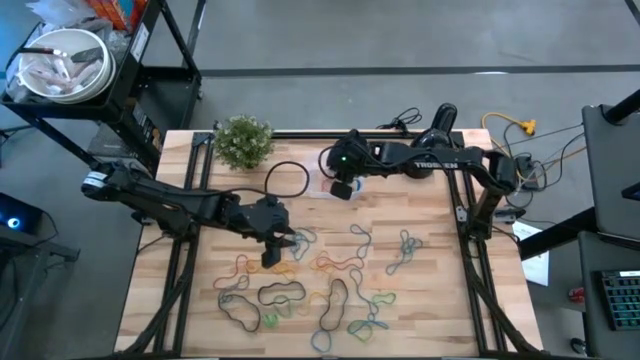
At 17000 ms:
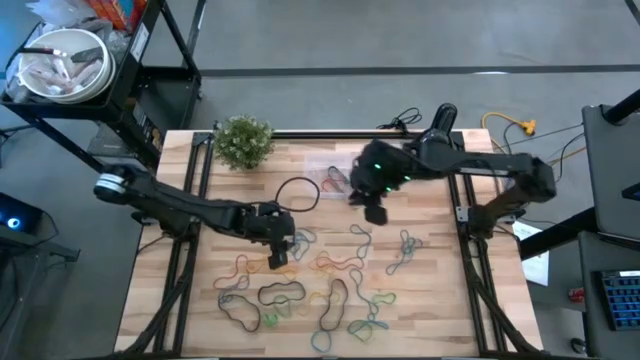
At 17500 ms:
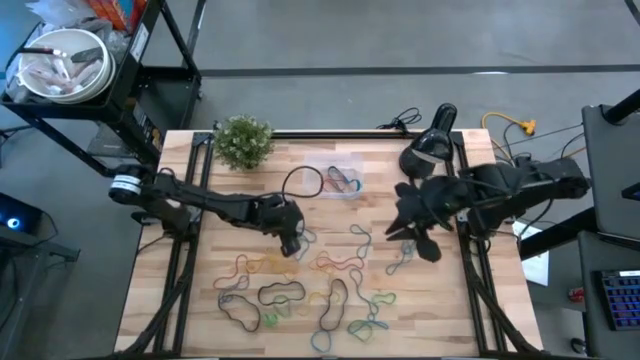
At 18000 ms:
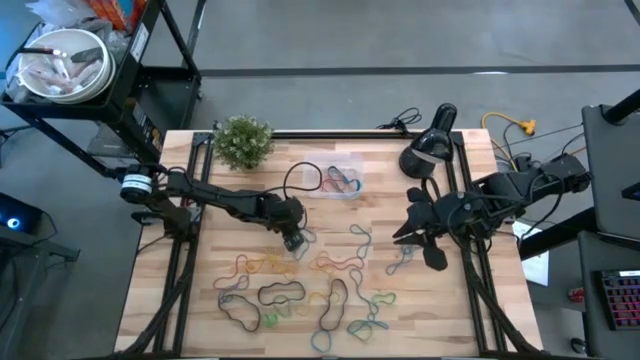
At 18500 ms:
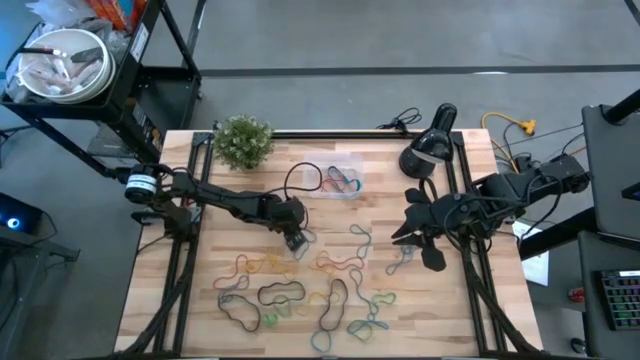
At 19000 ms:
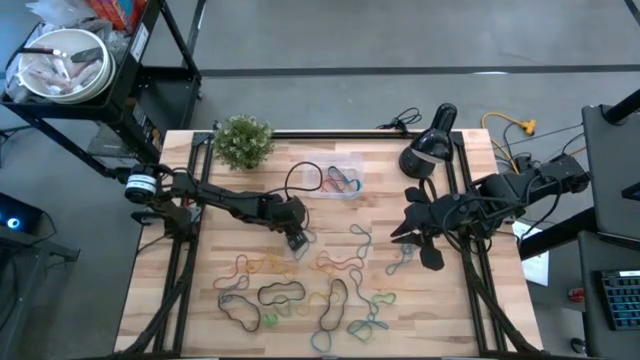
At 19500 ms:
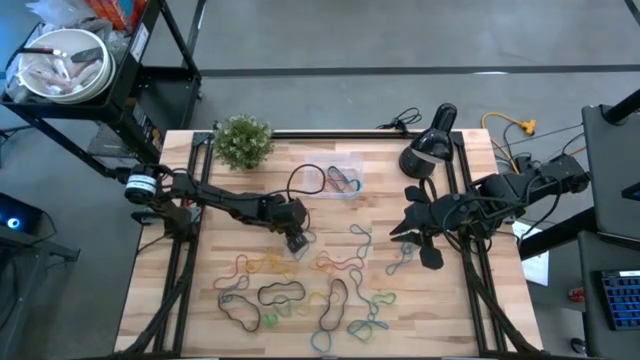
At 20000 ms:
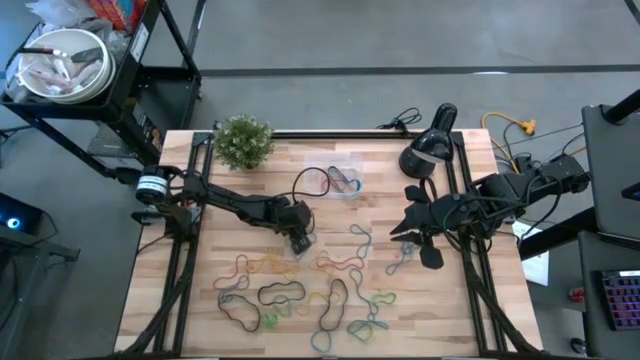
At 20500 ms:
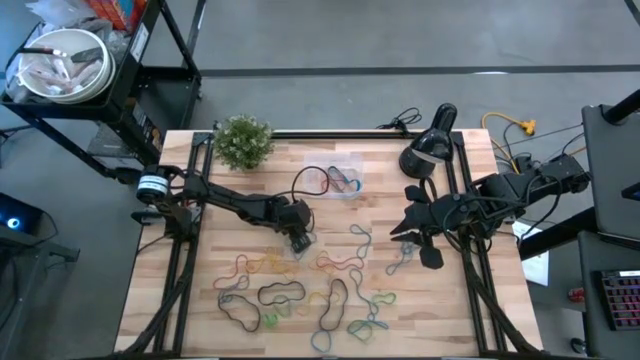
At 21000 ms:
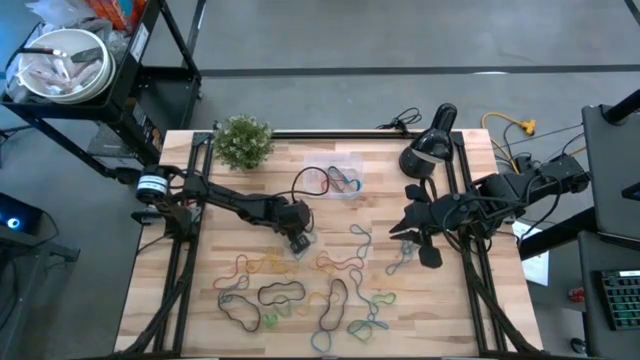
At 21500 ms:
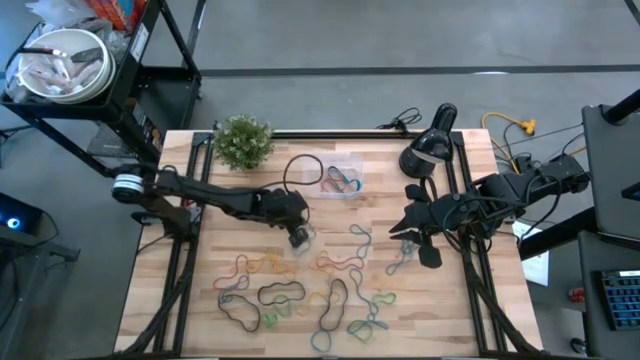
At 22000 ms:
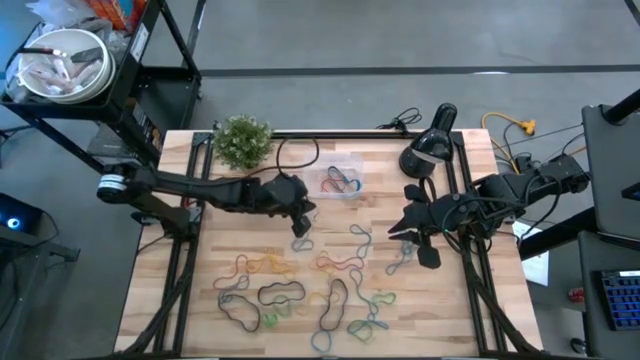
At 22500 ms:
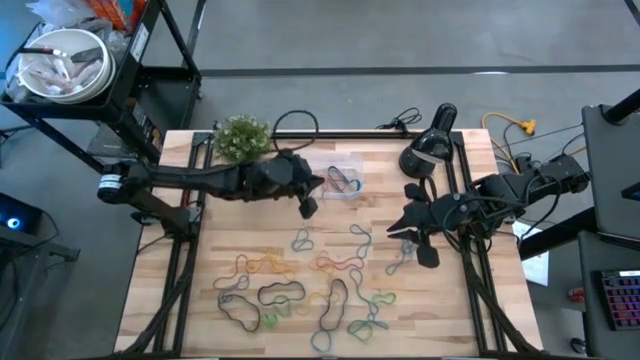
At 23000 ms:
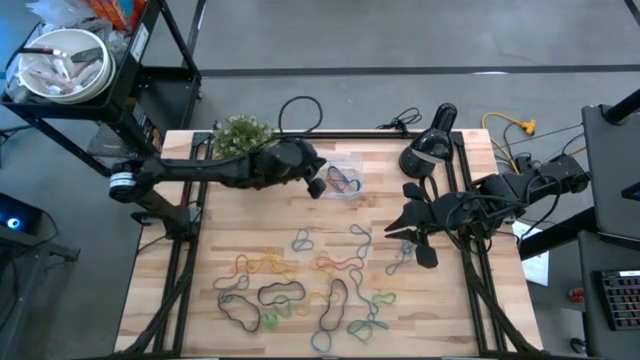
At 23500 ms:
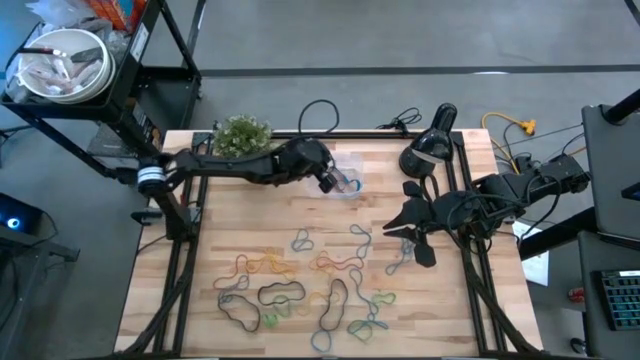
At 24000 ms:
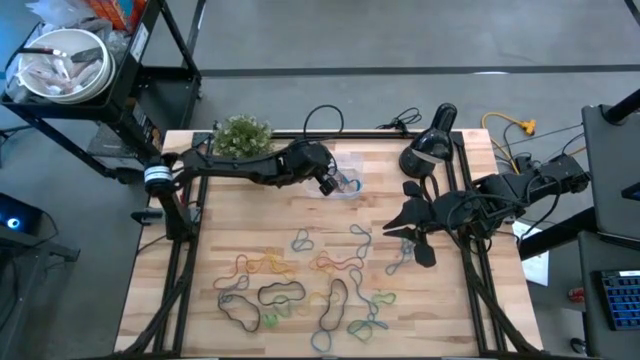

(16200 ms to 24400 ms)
Task: Pick and place rubber bands into bin
Put the blue rubberband into the transparent bin

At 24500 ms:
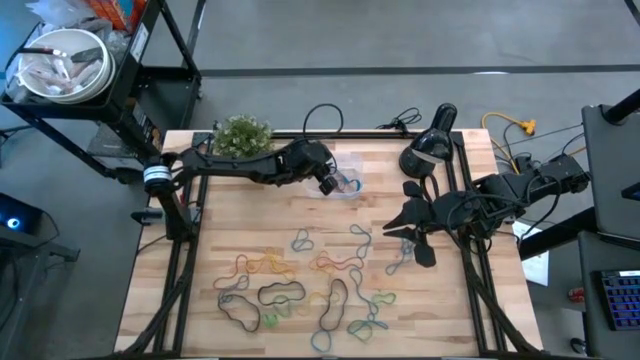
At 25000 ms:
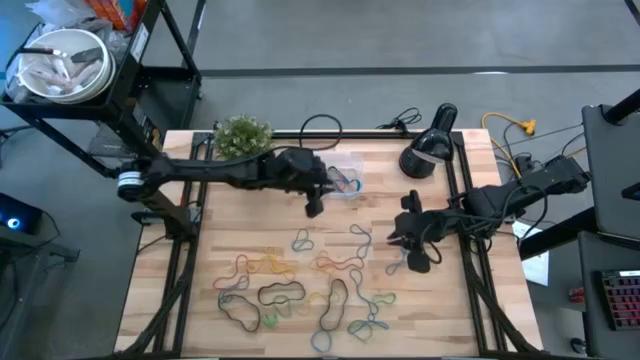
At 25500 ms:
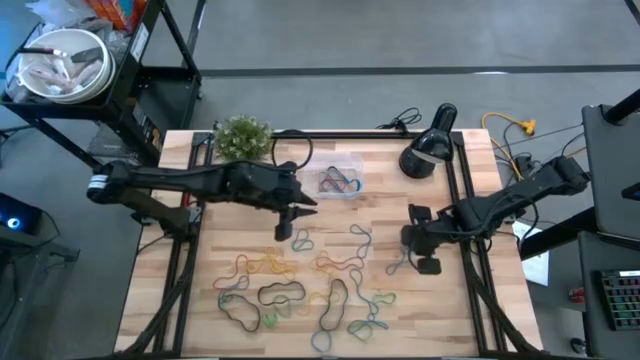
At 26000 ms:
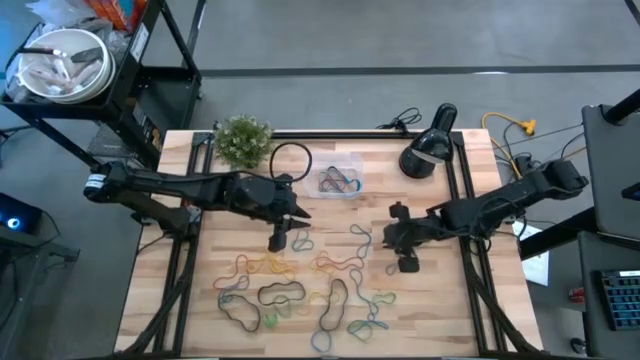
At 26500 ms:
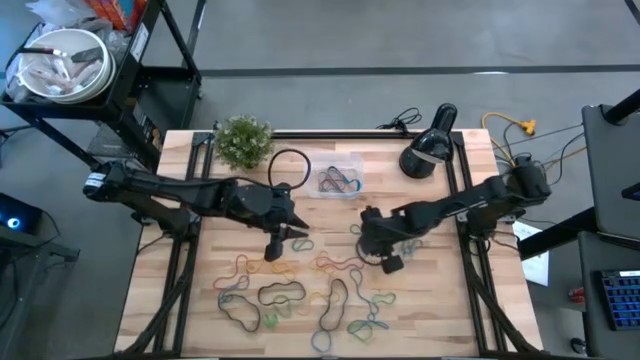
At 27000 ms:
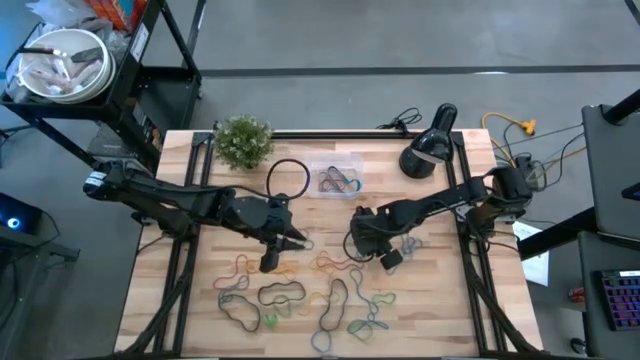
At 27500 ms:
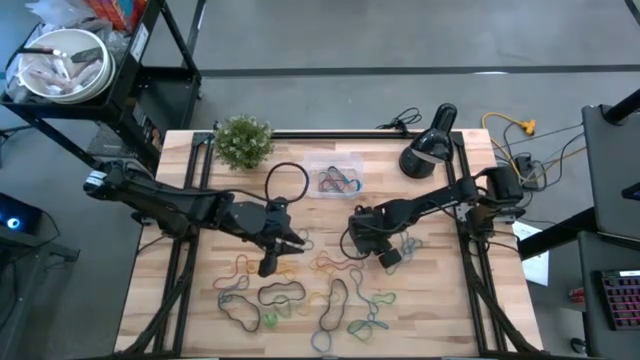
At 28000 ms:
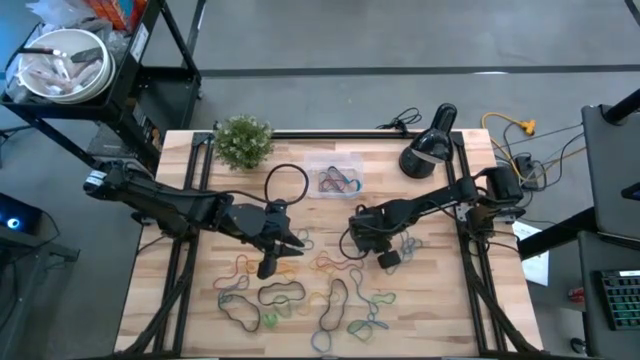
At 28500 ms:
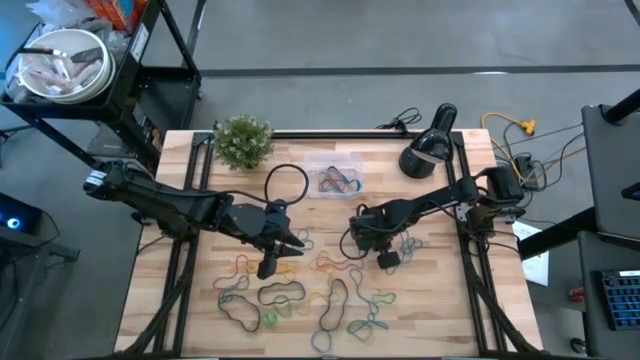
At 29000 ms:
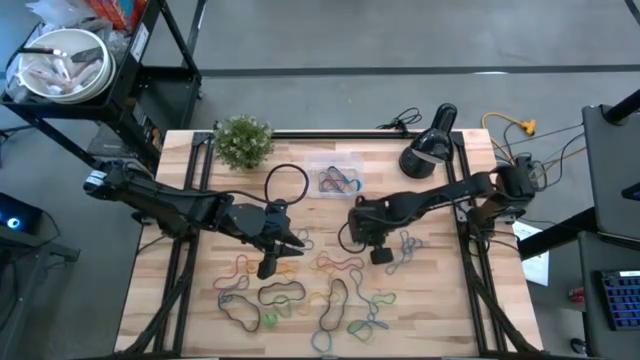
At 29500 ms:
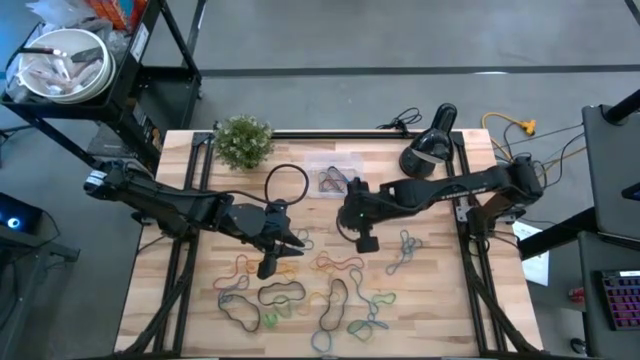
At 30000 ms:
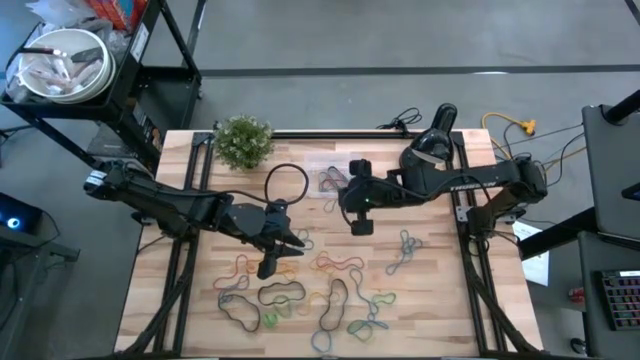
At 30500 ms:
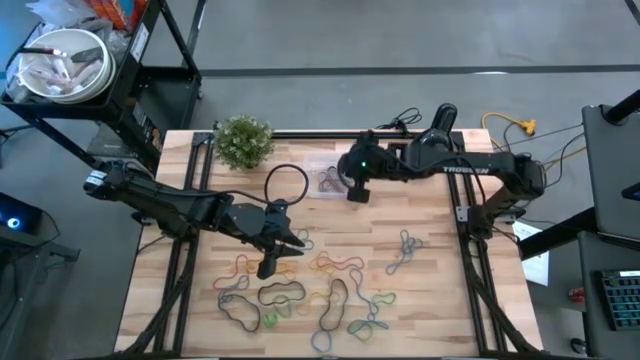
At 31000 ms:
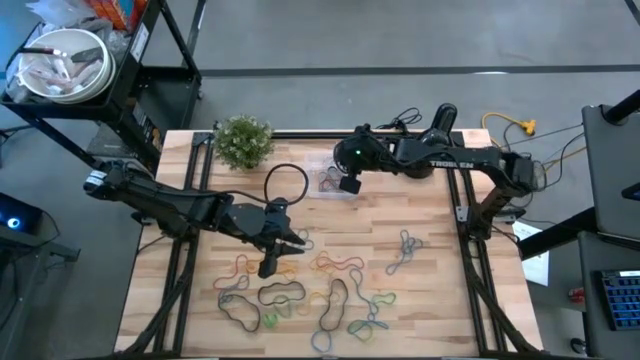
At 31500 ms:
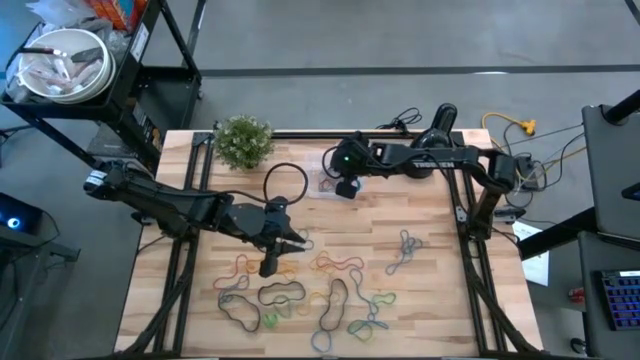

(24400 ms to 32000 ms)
Put the blue rubberband into the transparent bin

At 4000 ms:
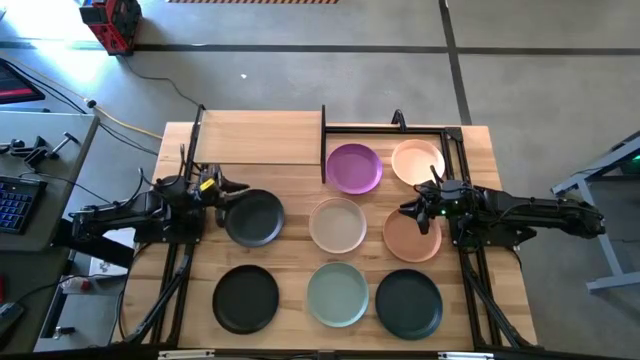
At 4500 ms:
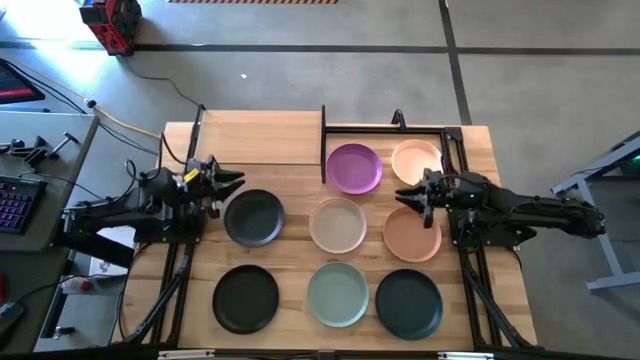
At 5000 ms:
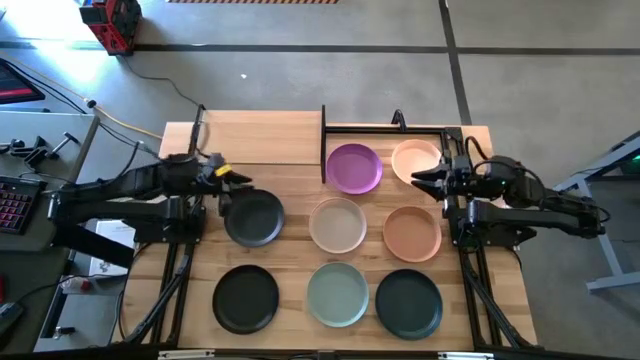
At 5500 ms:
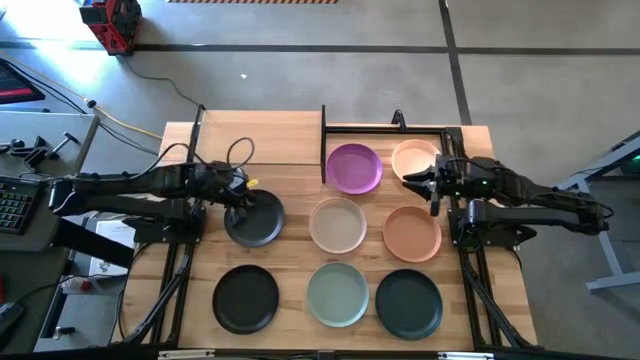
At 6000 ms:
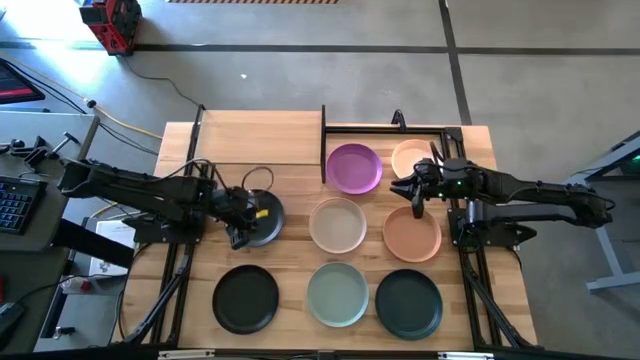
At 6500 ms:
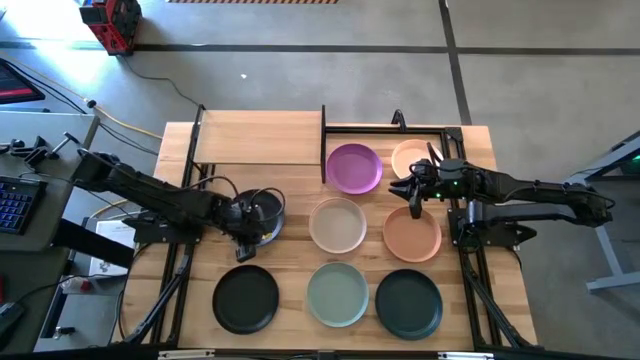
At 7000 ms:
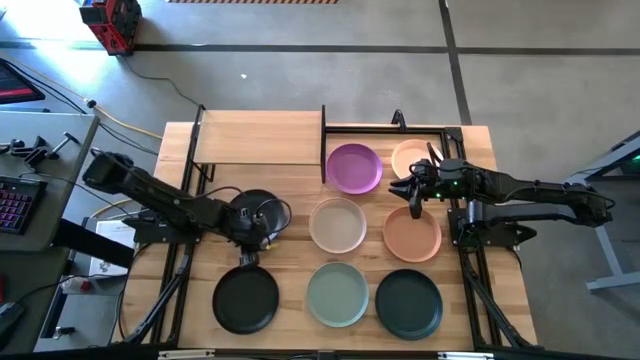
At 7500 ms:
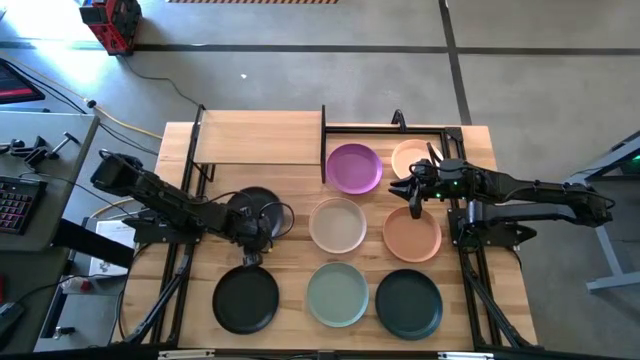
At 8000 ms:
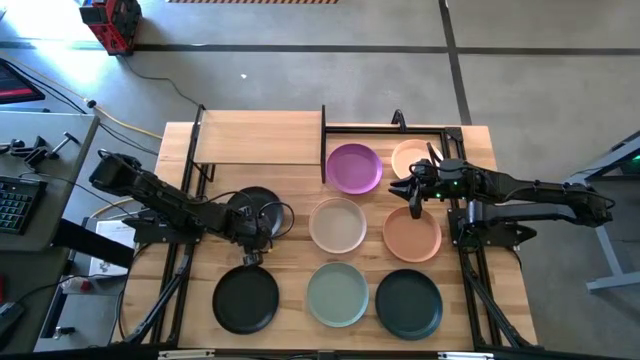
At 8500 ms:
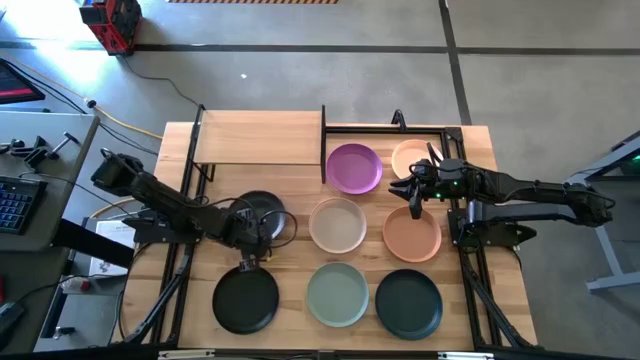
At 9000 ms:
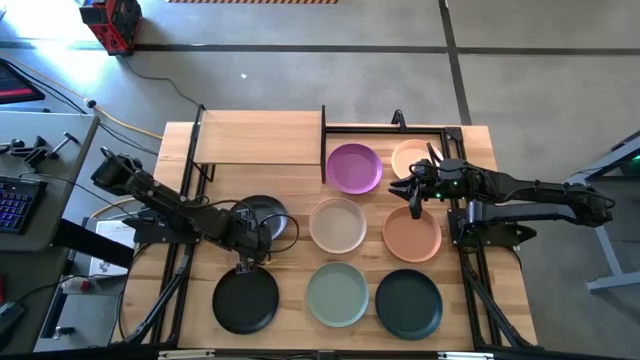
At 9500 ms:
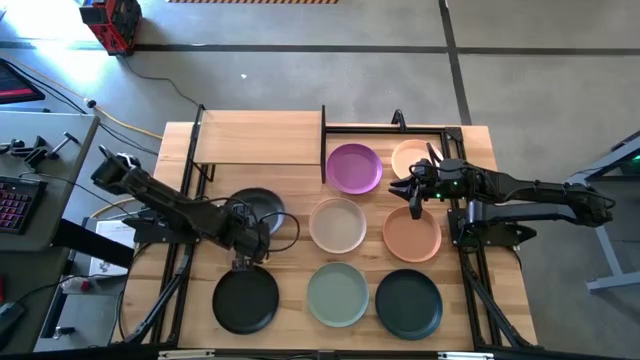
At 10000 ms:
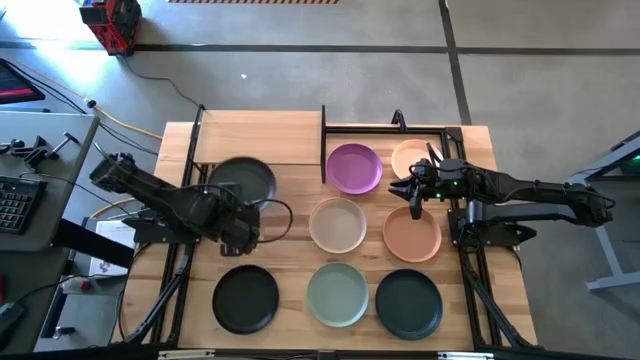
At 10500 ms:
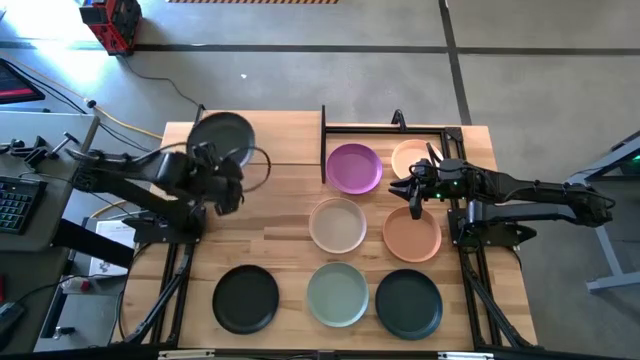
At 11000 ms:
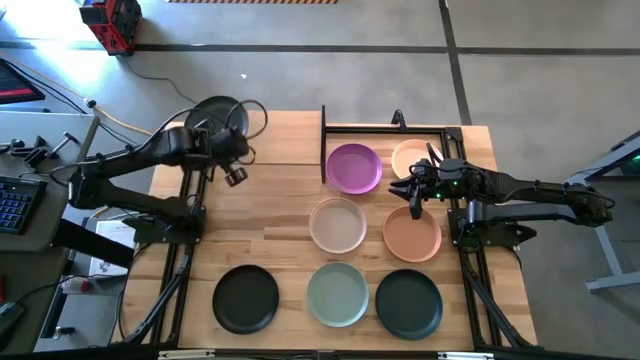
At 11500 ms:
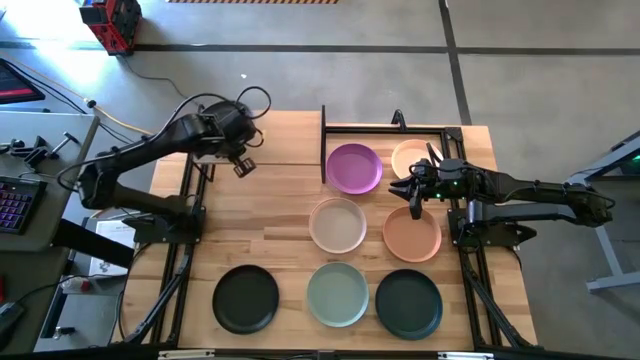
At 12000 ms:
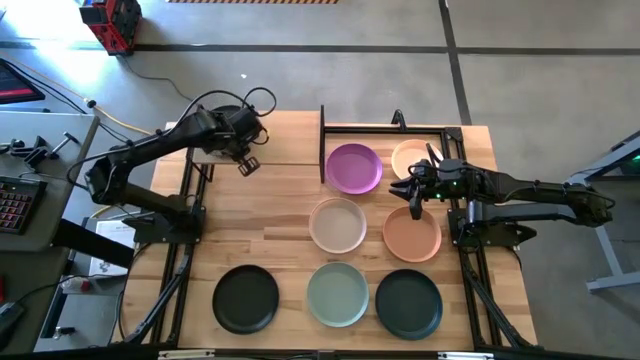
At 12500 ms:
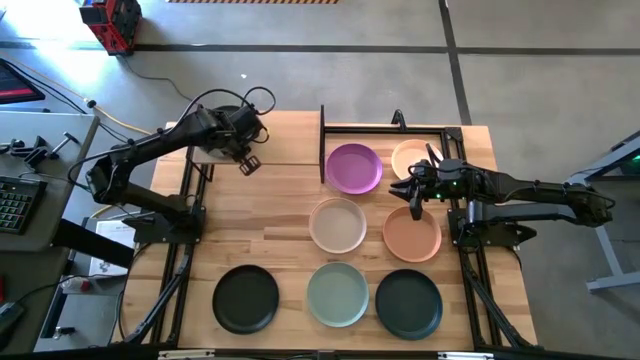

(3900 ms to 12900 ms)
Task: Place and stack plates onto a shelf
Put the top left black plate on the shelf
